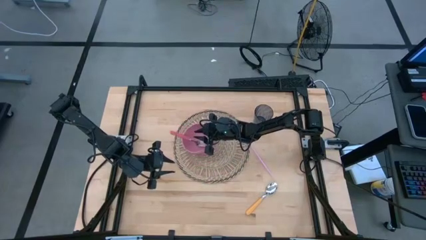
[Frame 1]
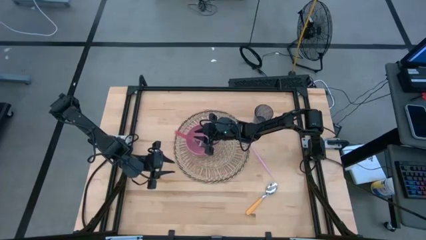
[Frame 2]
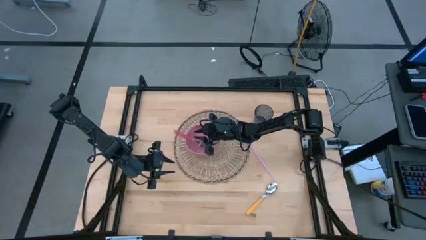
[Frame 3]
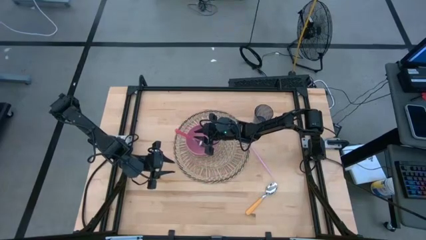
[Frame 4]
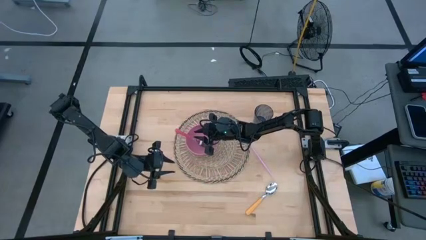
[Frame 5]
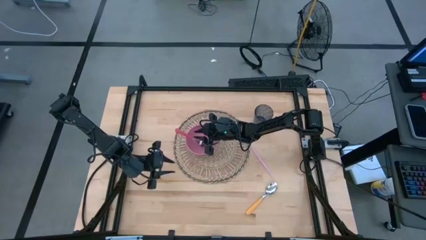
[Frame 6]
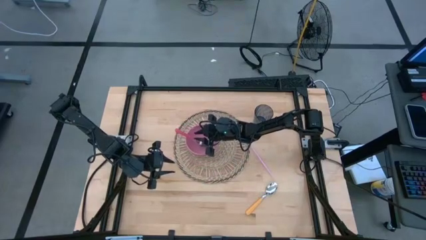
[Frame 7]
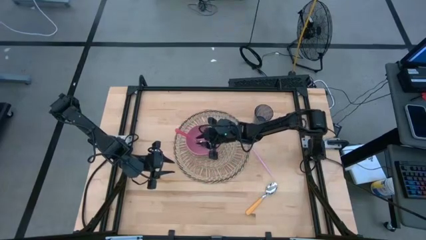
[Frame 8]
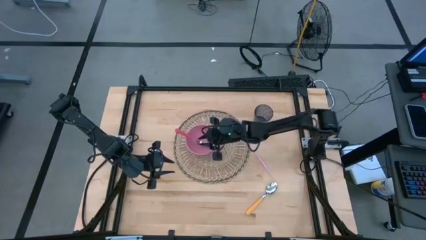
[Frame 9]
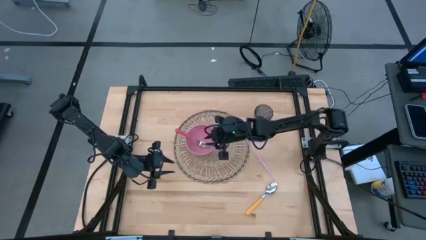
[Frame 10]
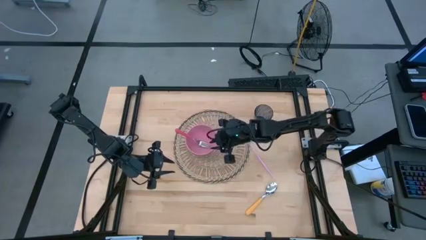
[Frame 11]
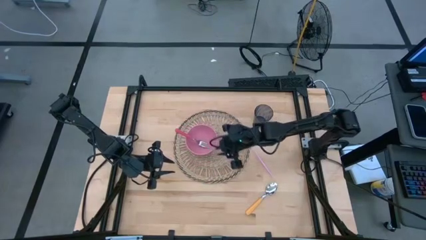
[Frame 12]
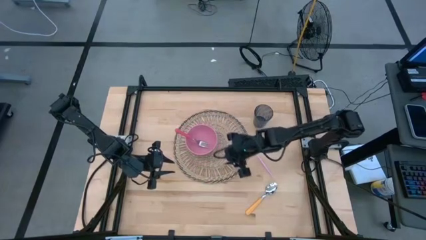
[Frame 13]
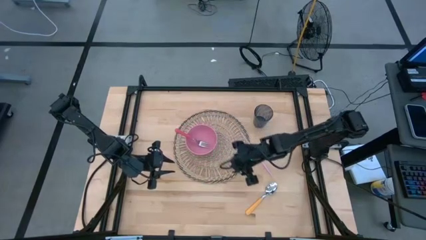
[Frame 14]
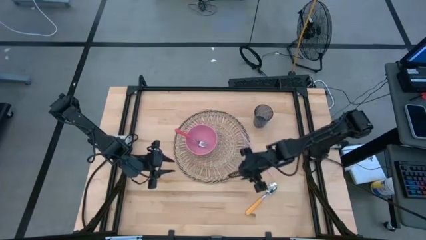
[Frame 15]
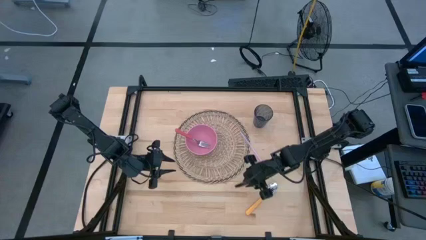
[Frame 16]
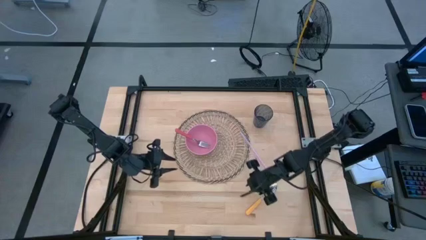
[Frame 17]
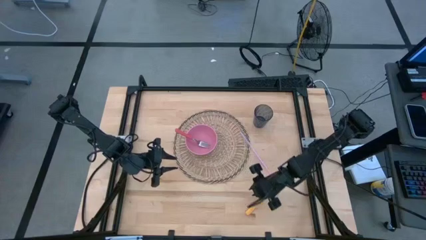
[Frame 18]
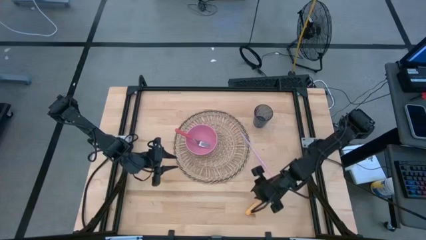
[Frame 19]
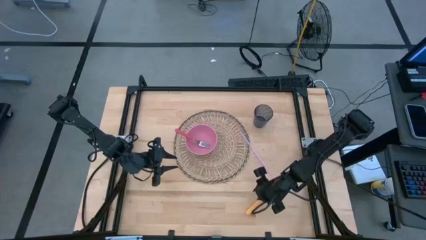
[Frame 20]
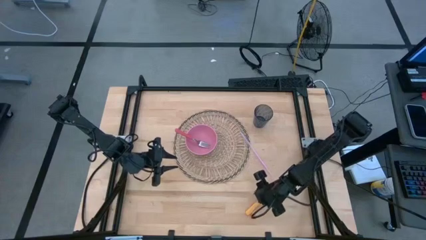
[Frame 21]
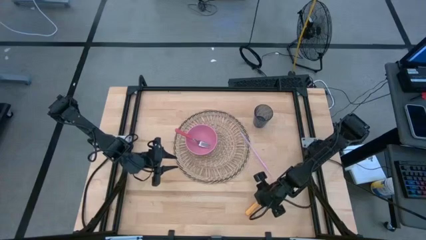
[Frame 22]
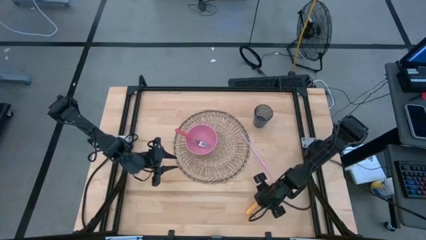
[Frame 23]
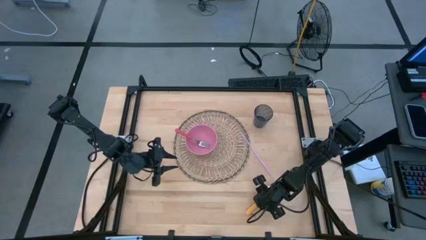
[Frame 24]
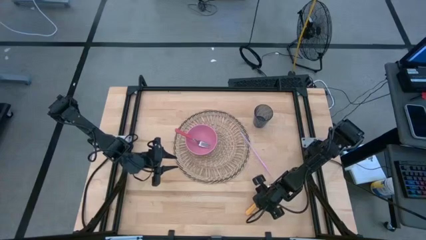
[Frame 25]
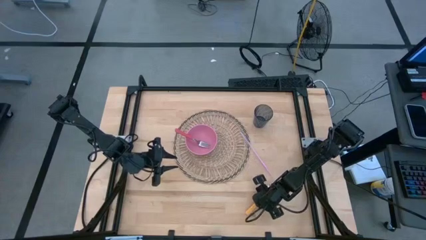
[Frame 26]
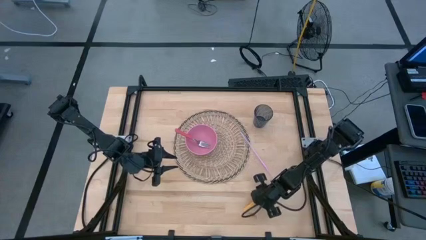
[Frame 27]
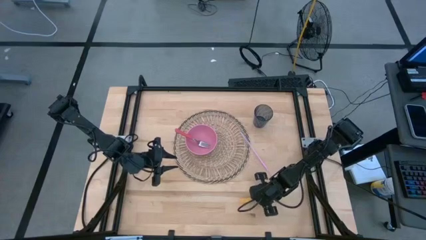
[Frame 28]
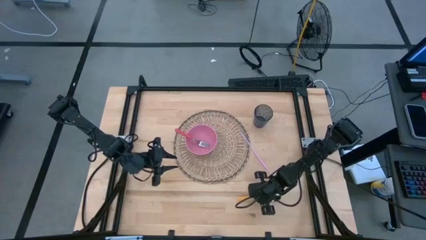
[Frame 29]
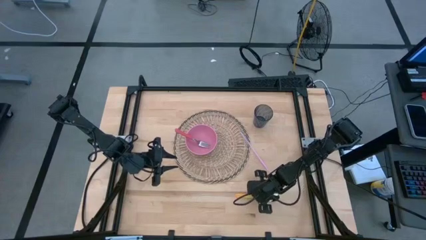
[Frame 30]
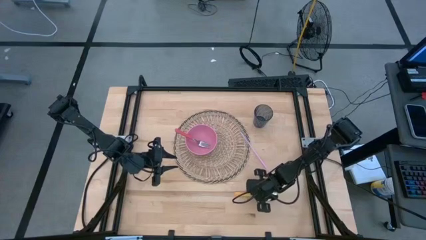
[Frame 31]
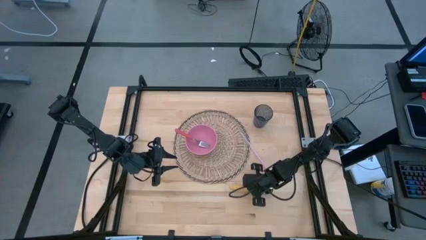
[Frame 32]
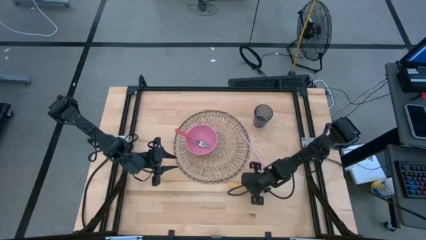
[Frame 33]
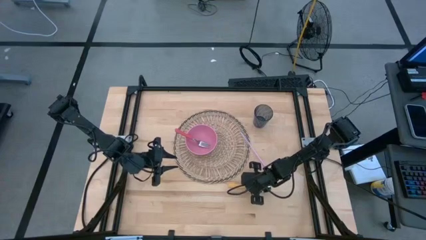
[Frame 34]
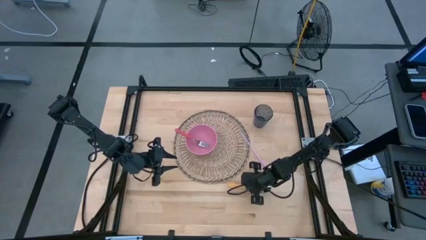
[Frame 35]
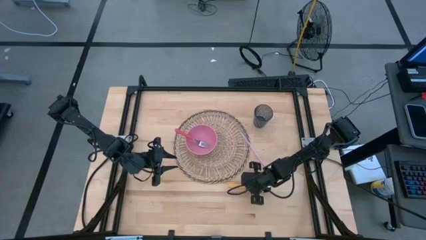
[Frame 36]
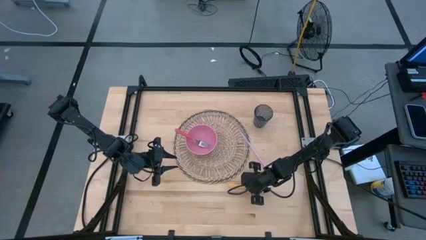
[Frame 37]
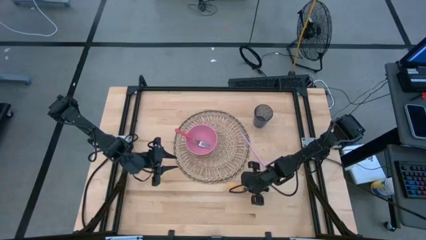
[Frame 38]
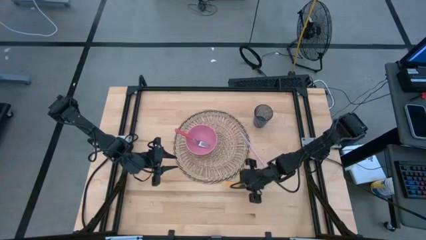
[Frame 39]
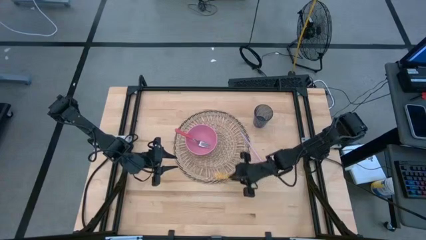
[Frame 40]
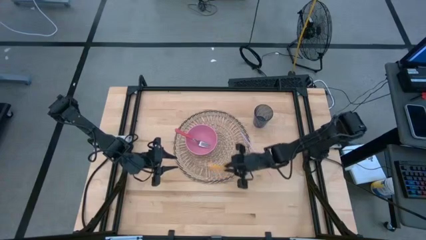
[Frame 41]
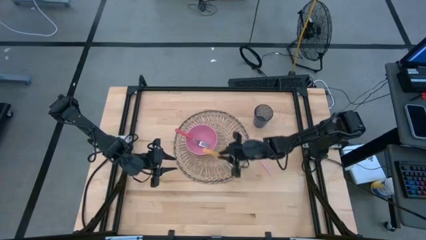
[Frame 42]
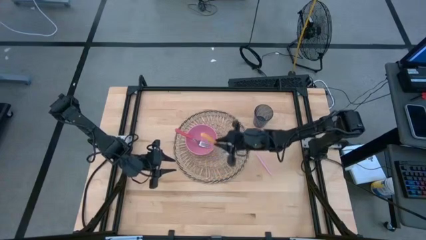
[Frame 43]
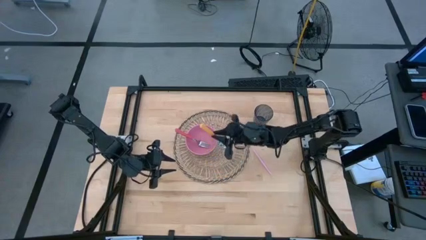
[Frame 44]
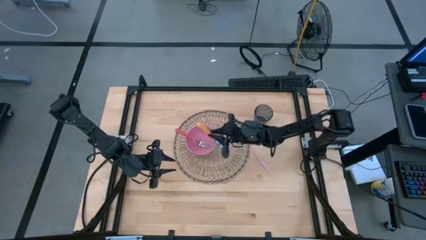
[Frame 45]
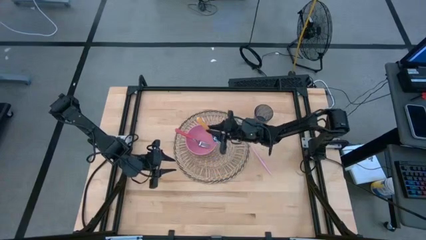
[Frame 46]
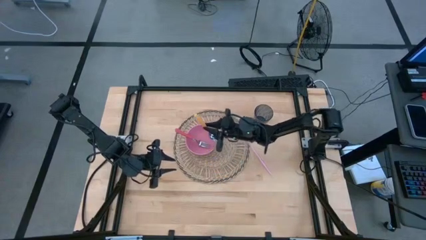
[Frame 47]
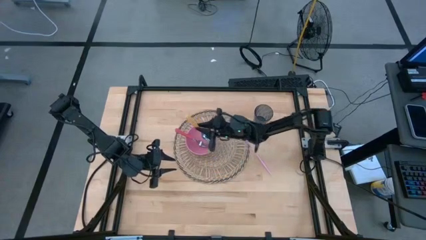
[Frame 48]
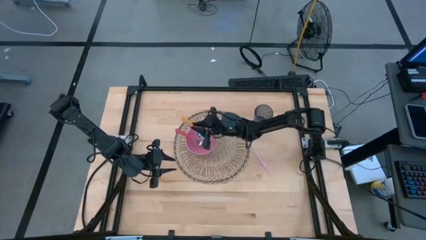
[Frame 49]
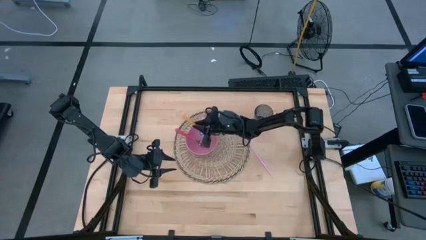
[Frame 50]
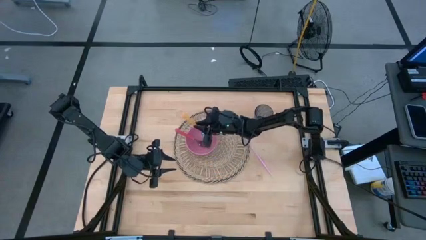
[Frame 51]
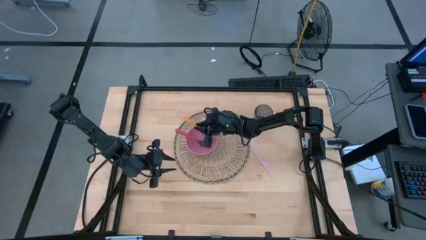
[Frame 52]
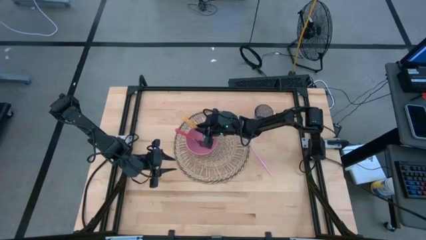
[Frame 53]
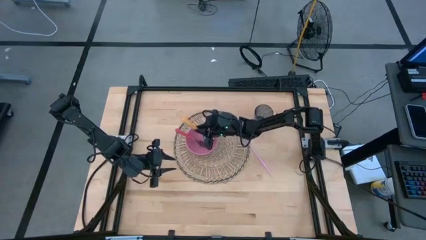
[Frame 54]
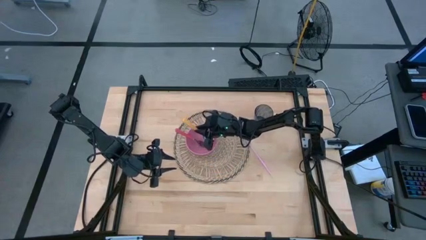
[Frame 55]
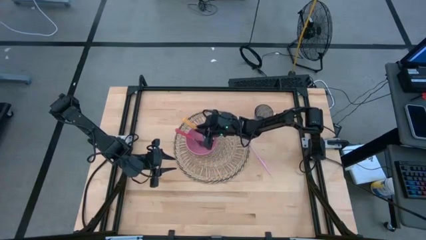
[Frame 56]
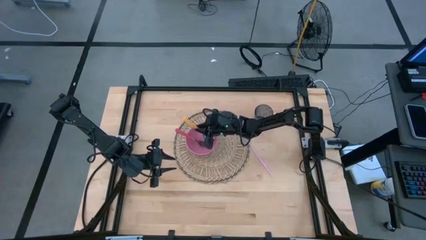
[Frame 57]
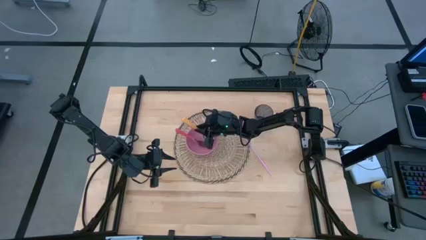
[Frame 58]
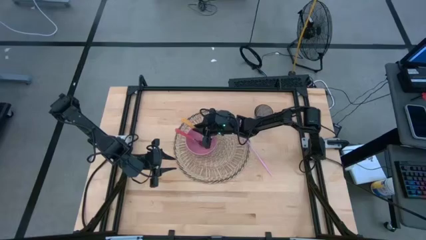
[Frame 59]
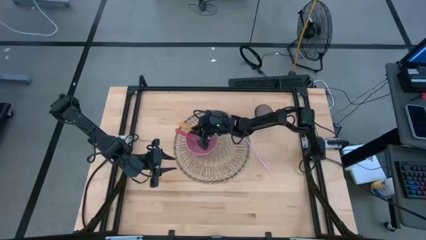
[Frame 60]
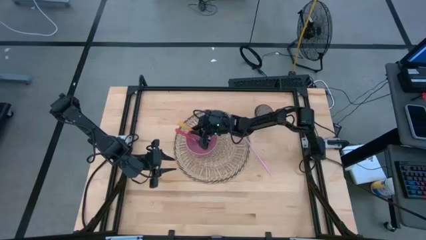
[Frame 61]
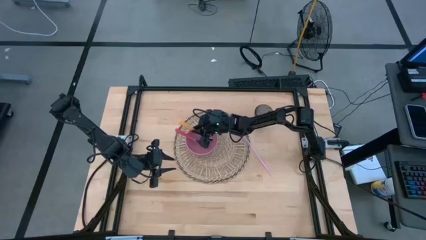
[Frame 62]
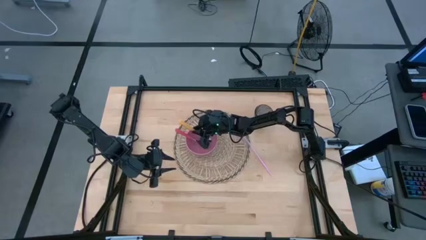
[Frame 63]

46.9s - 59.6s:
Task: Pick & Place Utensil
Put the yellow spoon into the pink bowl

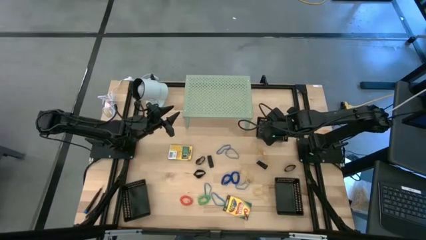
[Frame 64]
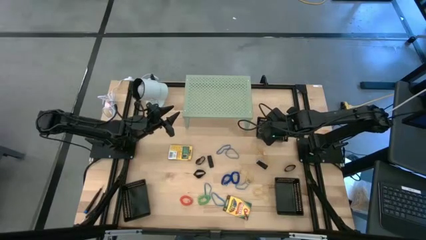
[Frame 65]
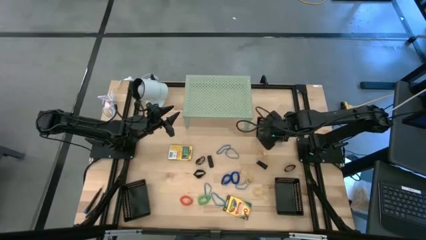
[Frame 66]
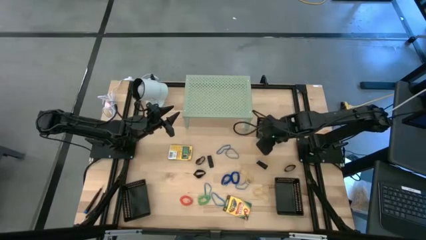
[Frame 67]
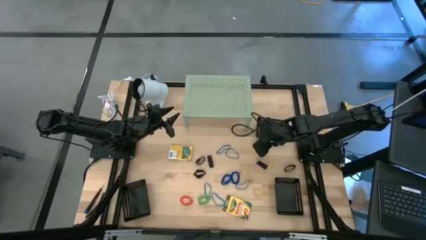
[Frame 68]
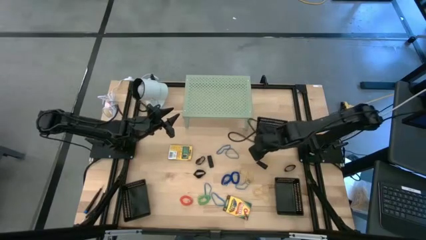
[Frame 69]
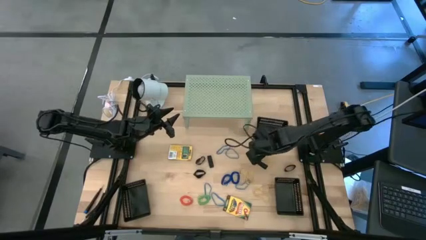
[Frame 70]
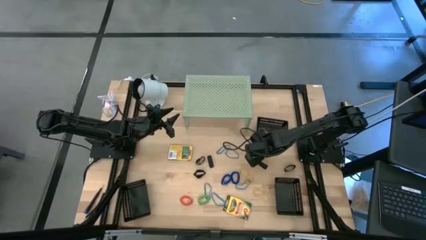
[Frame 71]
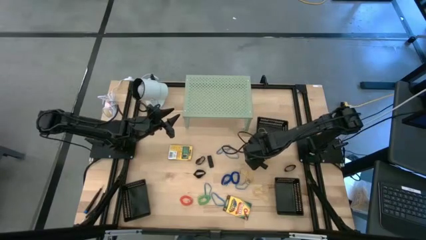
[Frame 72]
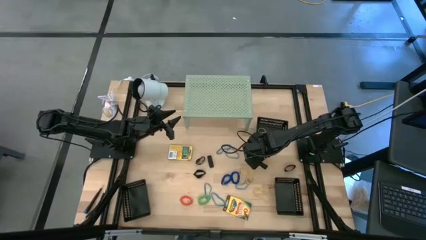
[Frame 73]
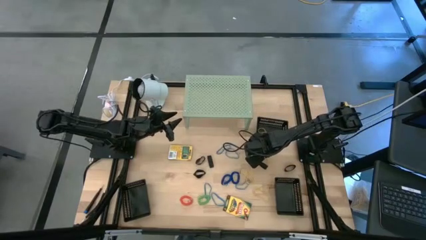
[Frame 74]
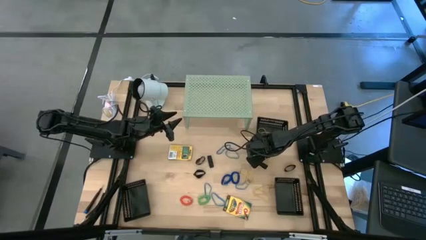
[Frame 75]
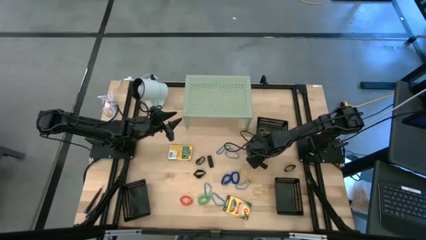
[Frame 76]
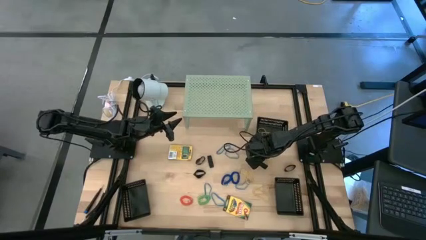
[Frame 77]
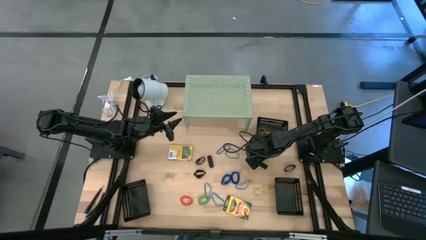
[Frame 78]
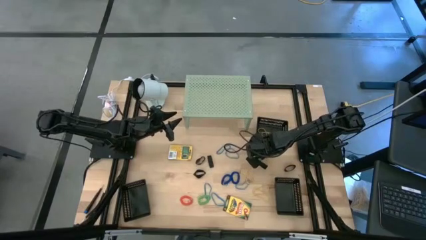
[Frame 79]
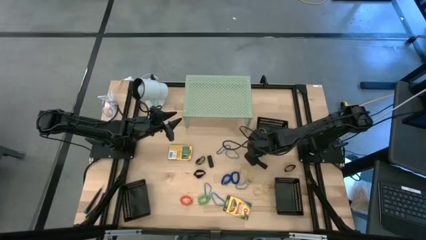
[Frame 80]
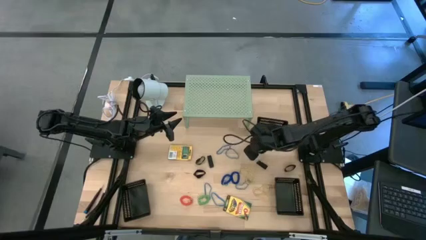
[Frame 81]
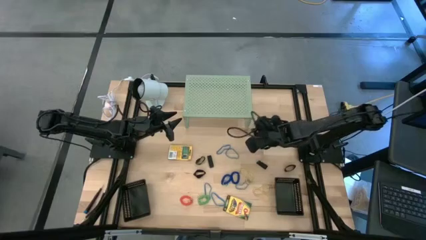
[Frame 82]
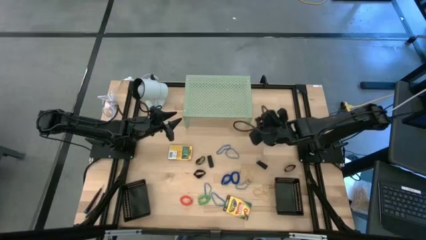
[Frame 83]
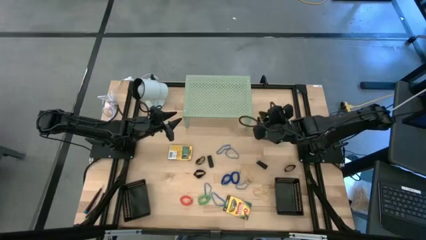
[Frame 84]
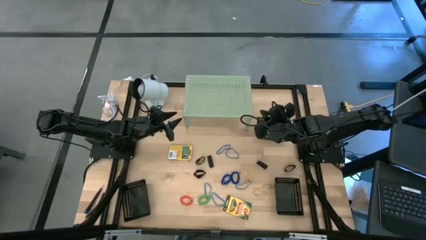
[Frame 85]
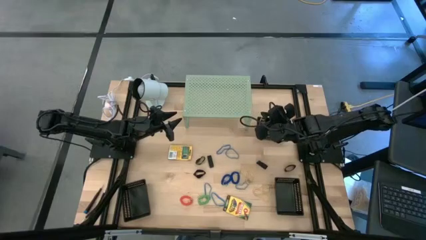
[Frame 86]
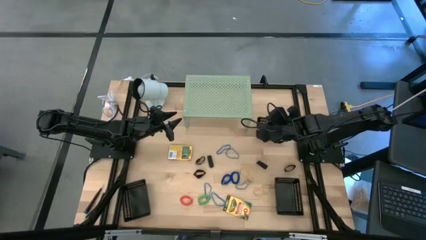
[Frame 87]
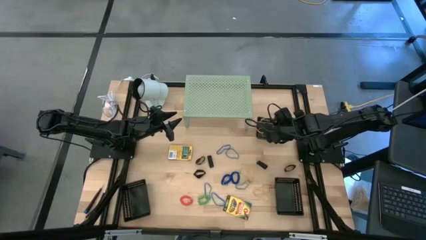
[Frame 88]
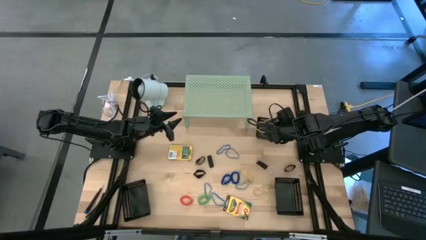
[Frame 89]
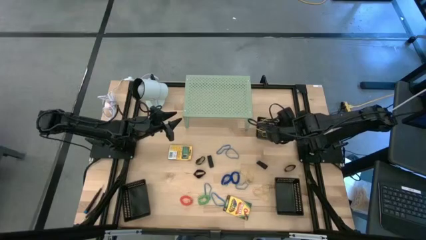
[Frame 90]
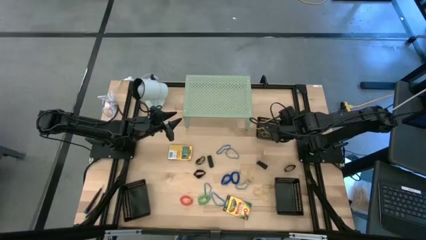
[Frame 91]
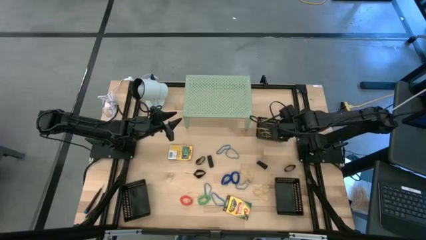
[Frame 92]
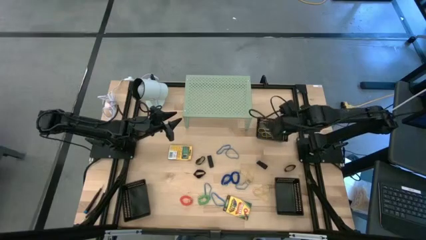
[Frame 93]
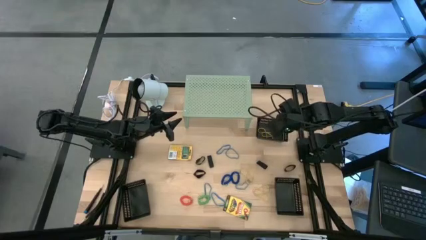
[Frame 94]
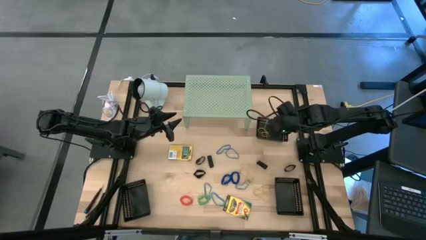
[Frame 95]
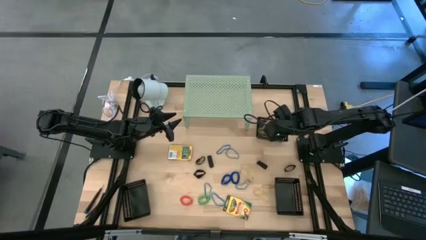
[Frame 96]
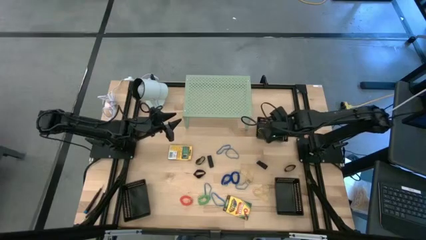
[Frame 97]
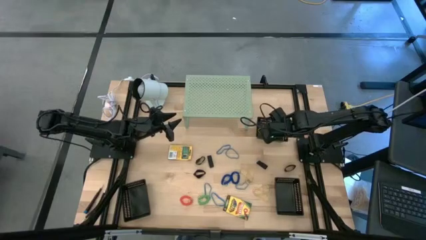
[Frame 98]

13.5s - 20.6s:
Task: Pick & Place Office Desk Supplies
Put the yellow rubber band into the top right black bin
